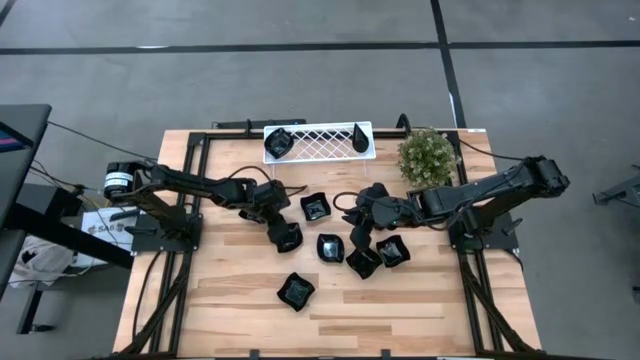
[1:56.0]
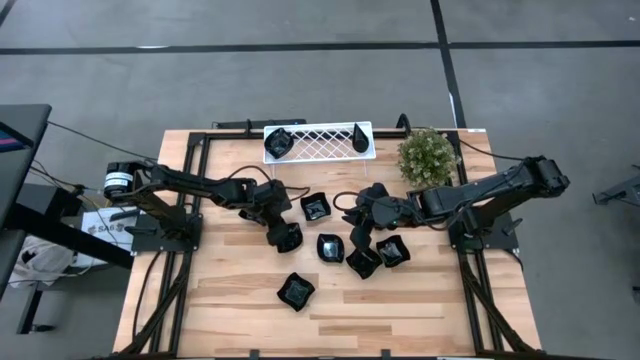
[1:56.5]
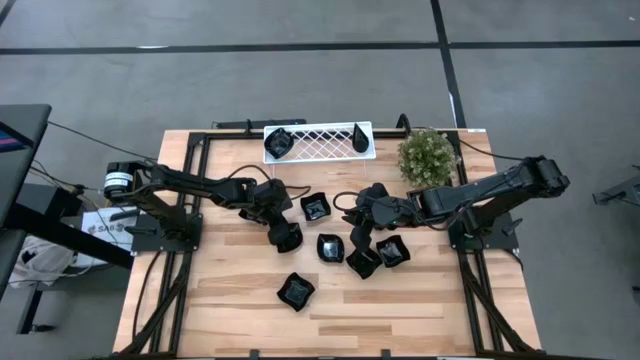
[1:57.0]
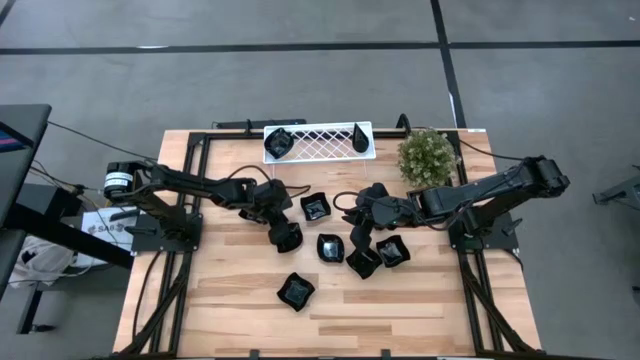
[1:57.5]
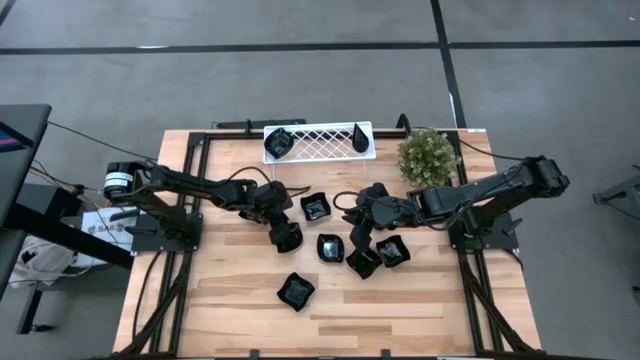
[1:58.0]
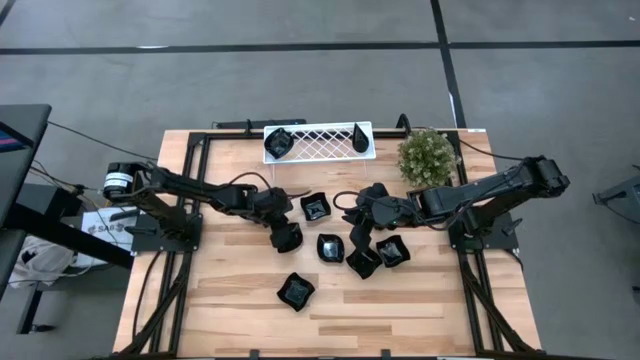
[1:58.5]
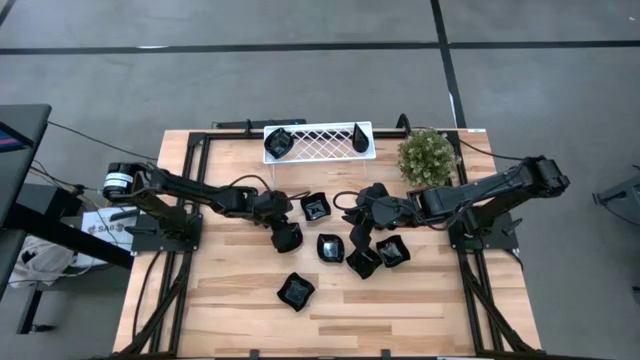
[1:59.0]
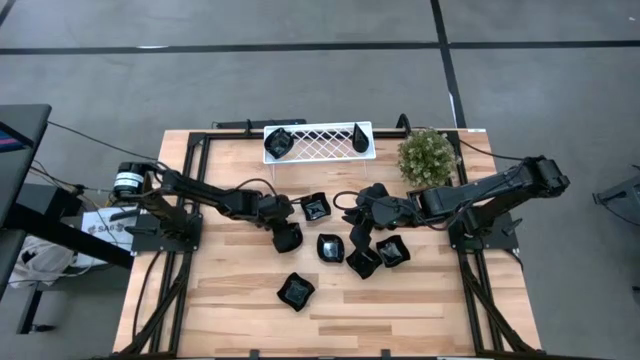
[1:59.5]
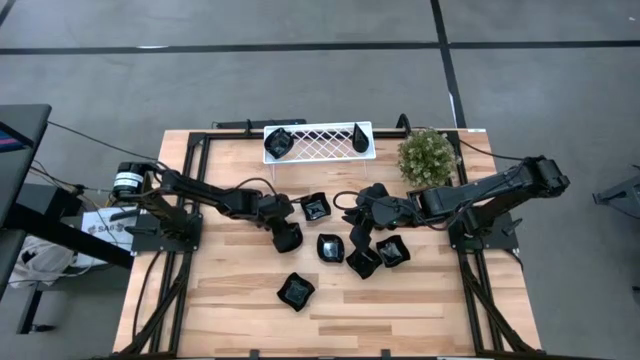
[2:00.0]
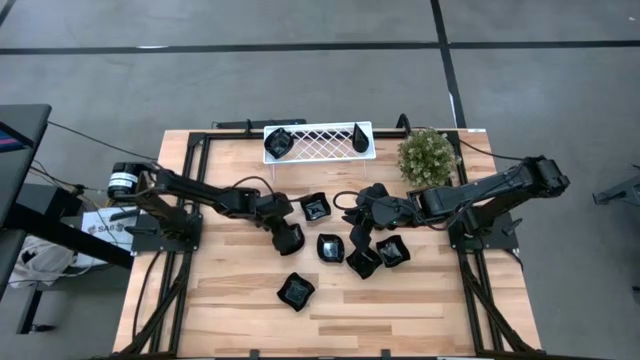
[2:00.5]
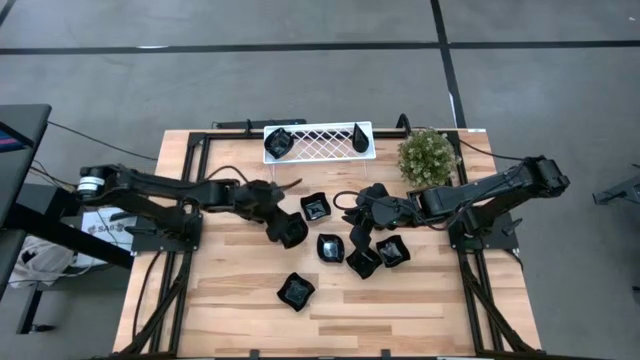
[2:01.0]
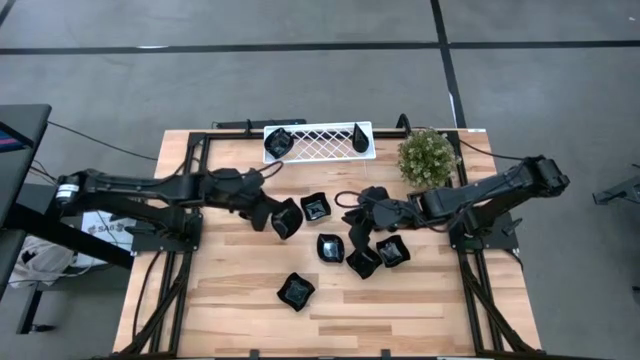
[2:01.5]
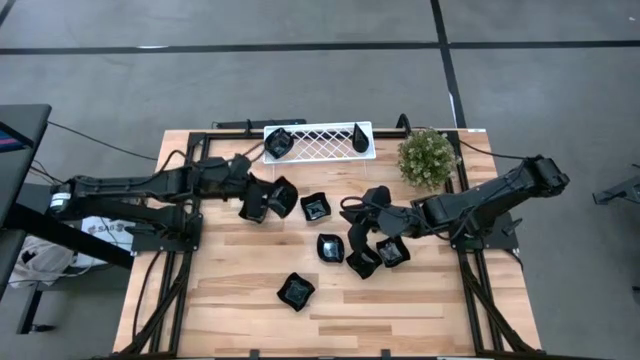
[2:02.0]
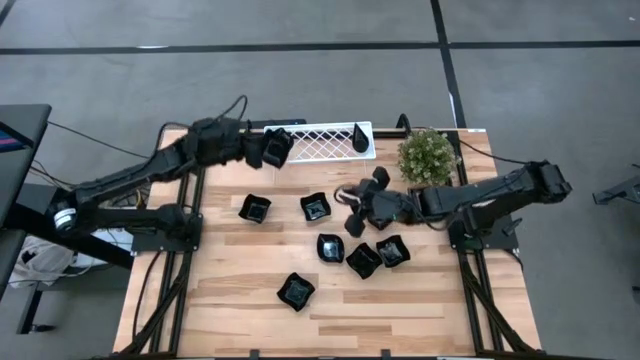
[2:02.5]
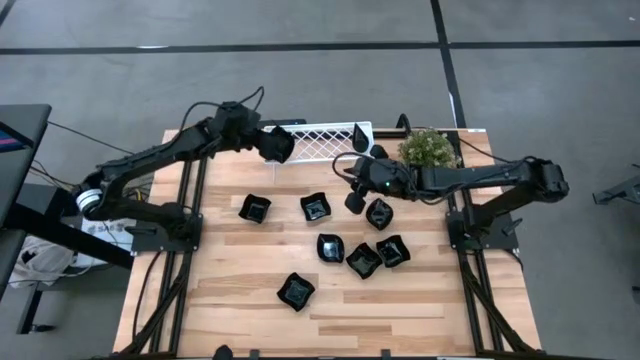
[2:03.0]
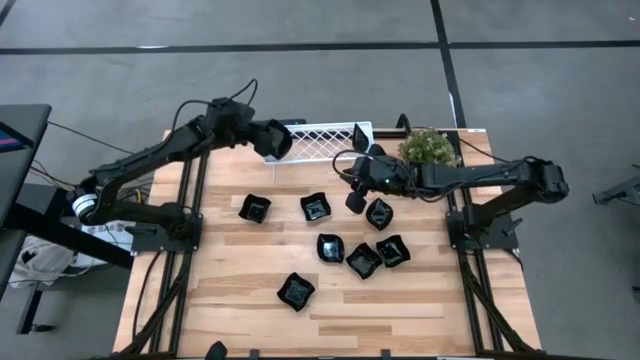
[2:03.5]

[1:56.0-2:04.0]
Task: Pick & Place Mini shaped plates
Stack the black leaf shaped plate on top of the black leaf shaped plate on the shelf

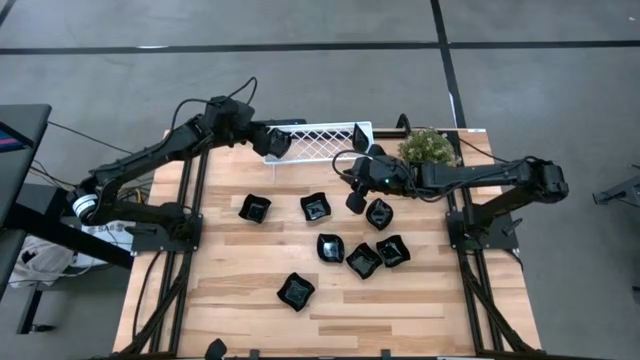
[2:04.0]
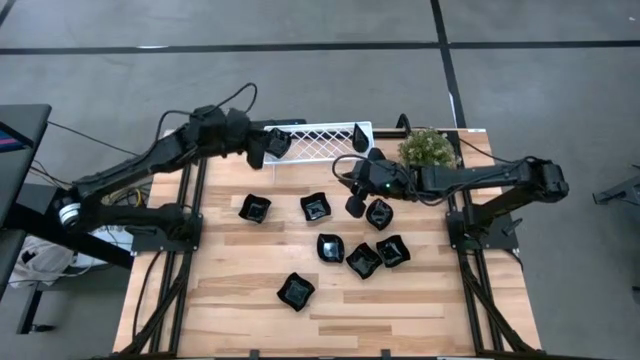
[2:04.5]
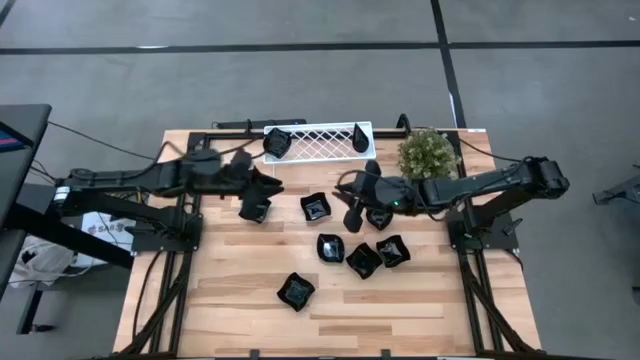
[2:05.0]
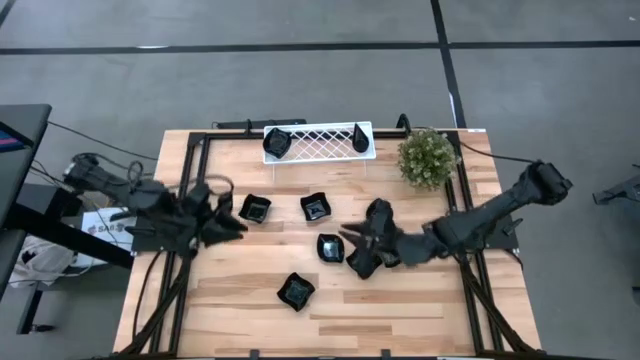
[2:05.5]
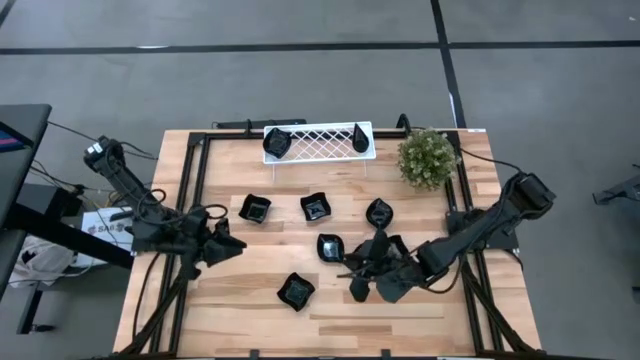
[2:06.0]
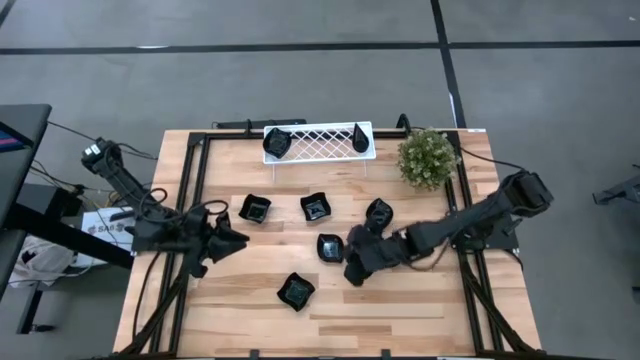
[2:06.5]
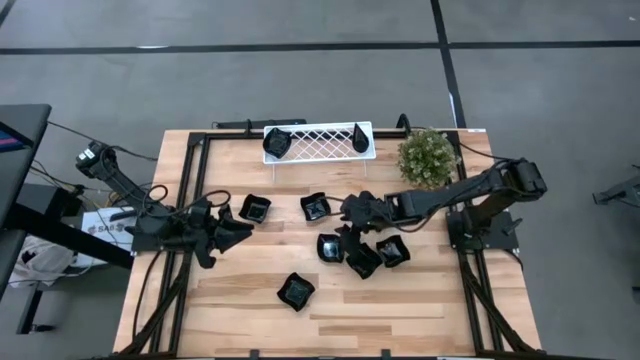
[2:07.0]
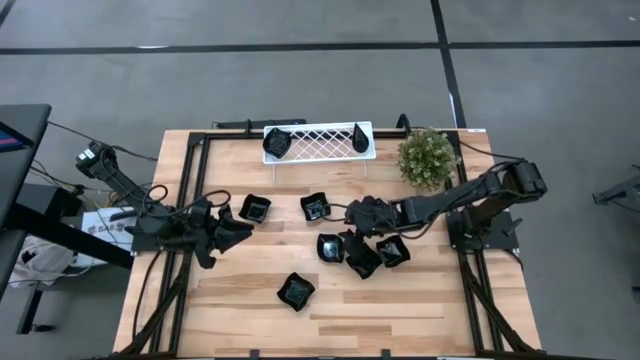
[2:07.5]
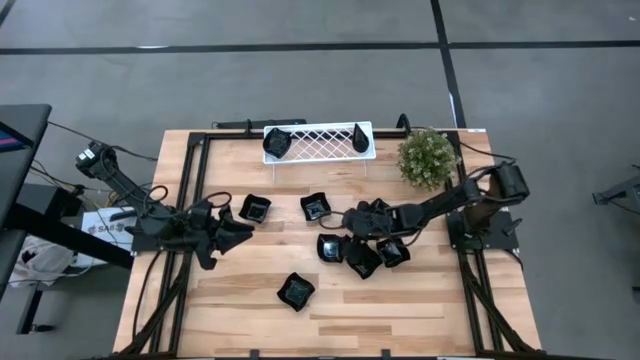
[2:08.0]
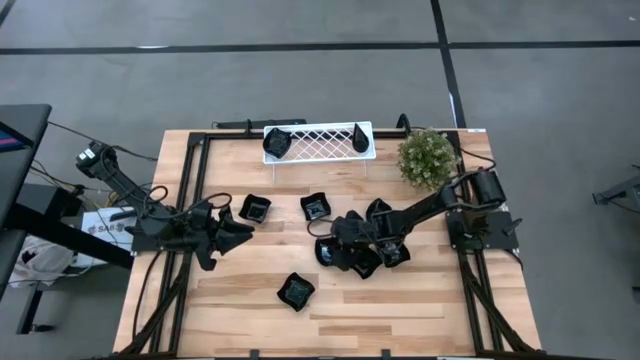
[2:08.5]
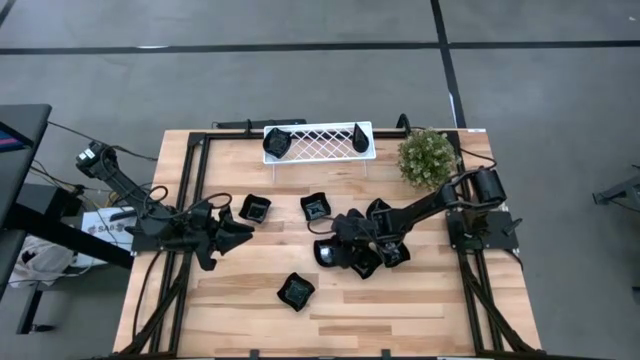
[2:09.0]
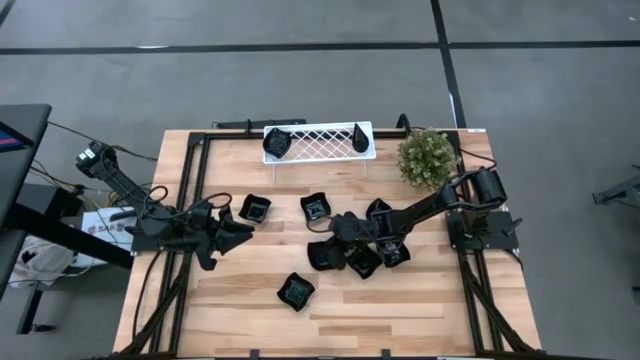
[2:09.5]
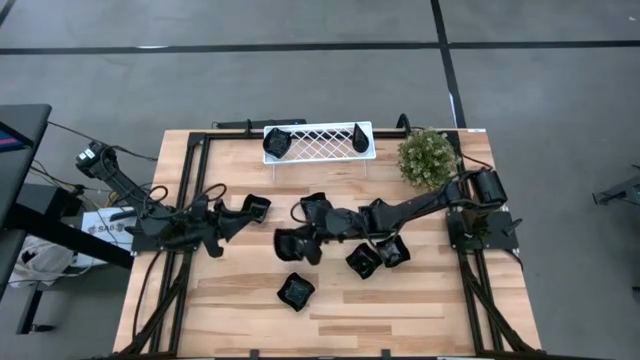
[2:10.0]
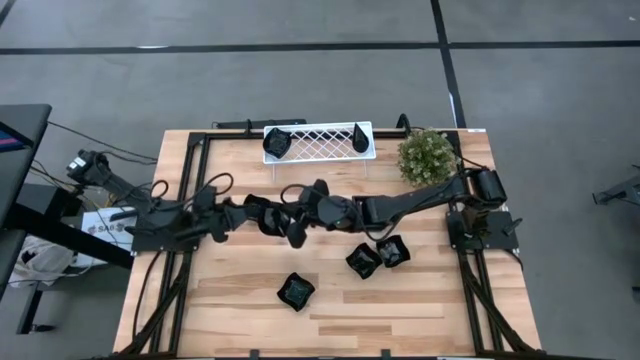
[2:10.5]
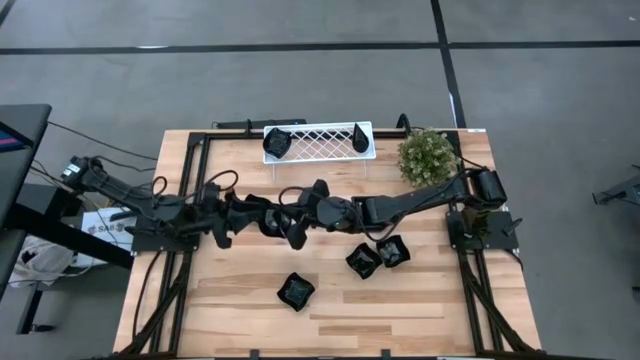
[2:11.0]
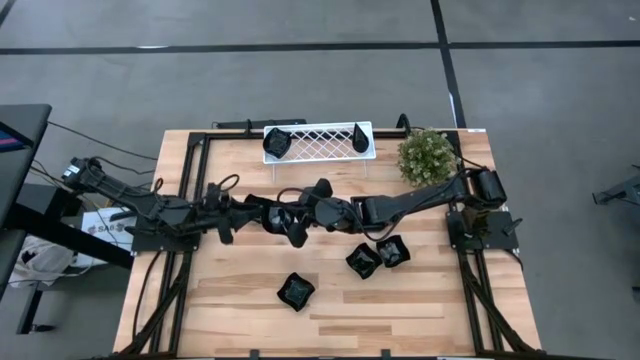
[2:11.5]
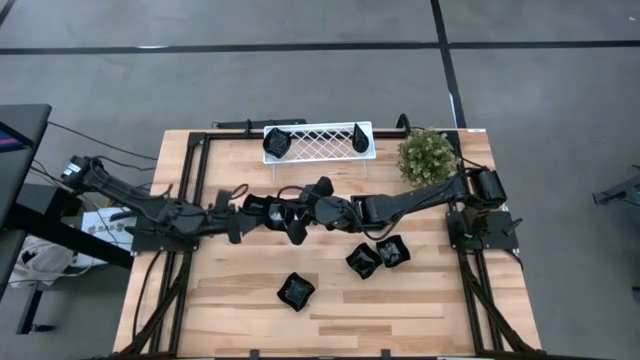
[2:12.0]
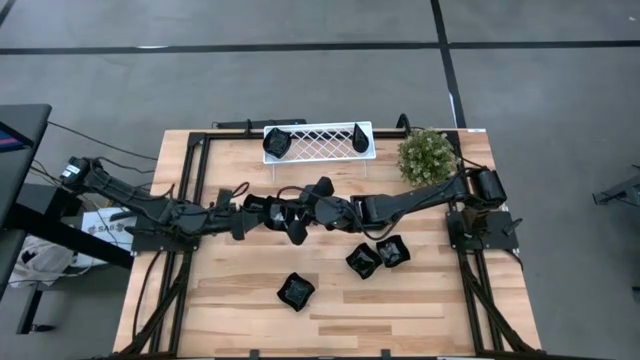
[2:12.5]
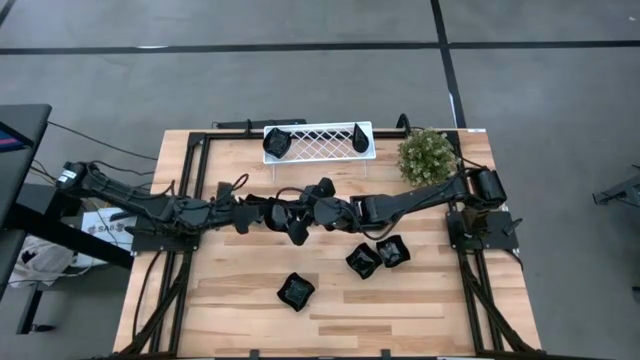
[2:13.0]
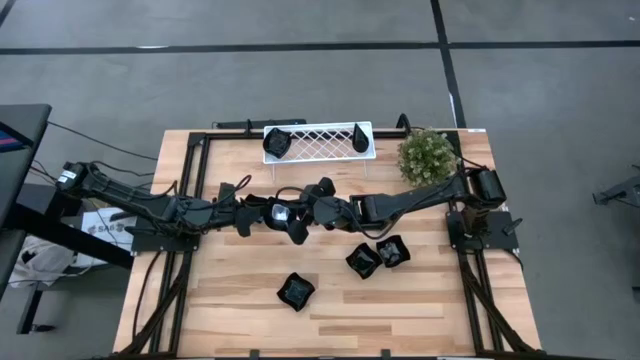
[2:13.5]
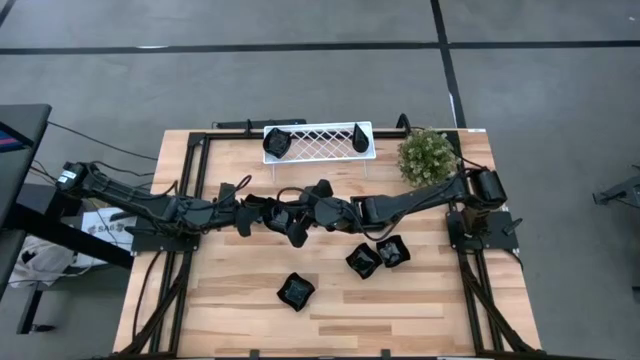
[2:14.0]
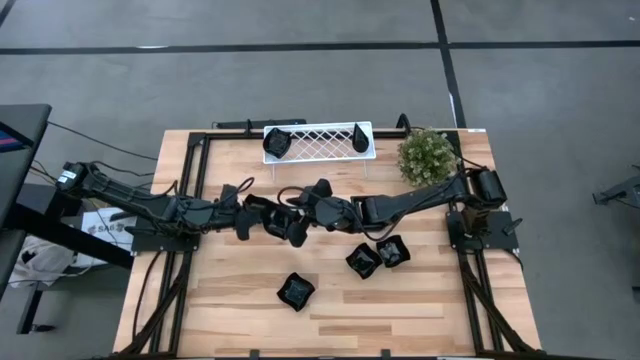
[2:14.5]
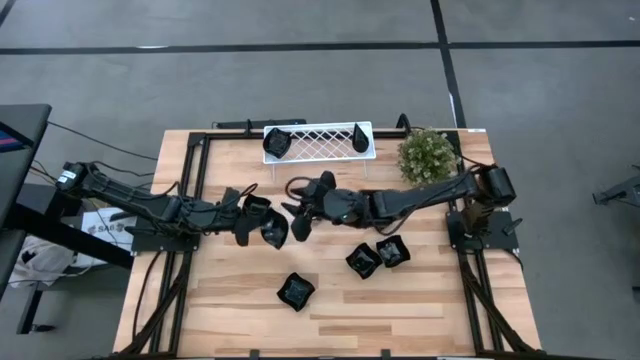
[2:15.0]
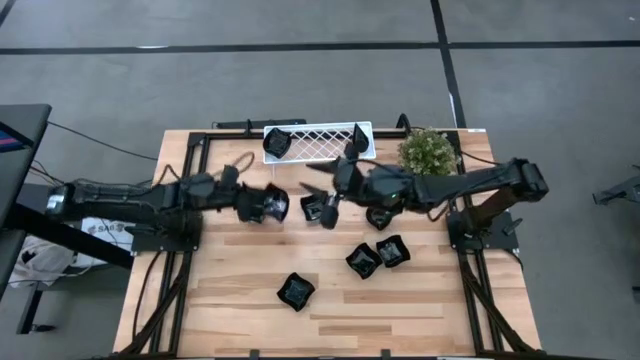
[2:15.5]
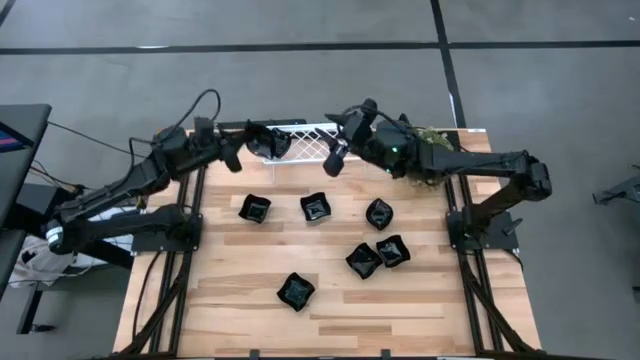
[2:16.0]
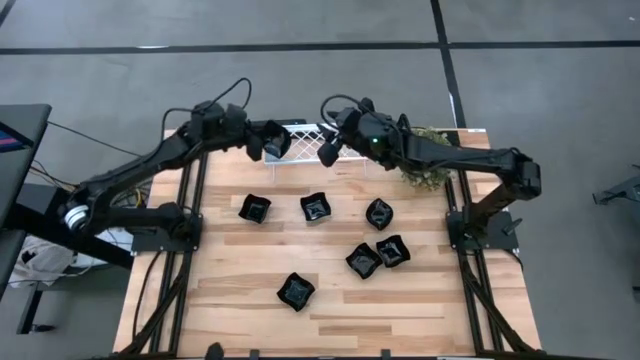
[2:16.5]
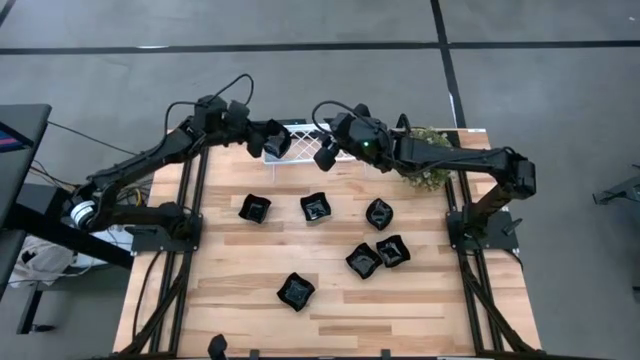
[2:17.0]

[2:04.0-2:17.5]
Stack the black leaf shaped plate on top of the black leaf shaped plate on the shelf
